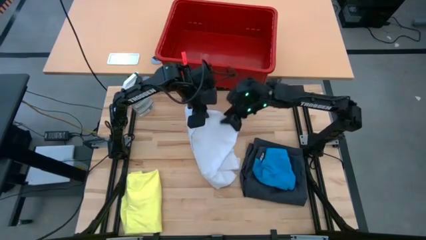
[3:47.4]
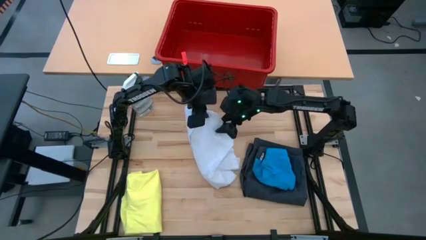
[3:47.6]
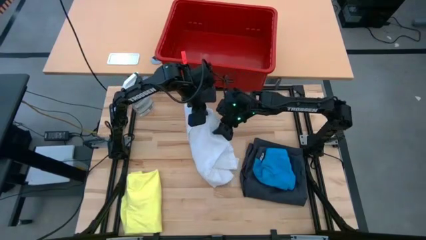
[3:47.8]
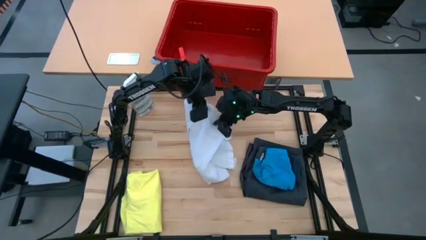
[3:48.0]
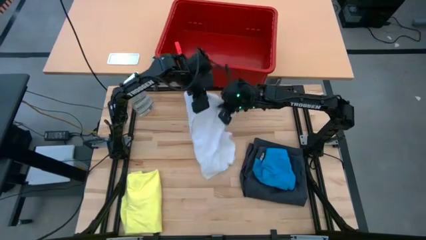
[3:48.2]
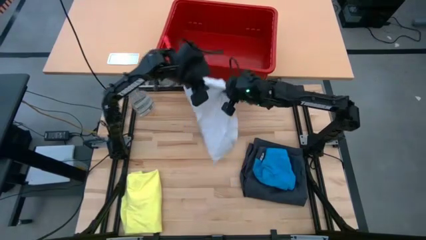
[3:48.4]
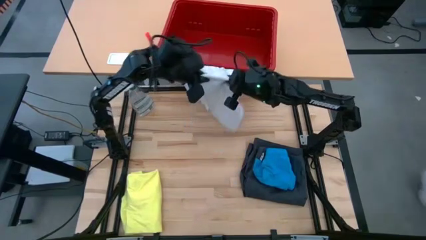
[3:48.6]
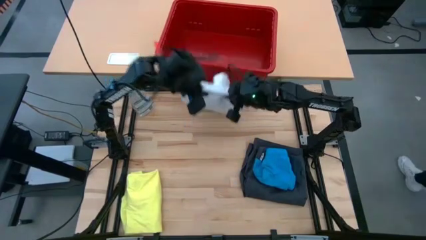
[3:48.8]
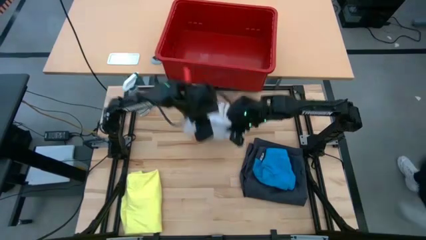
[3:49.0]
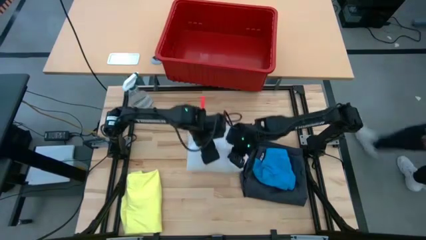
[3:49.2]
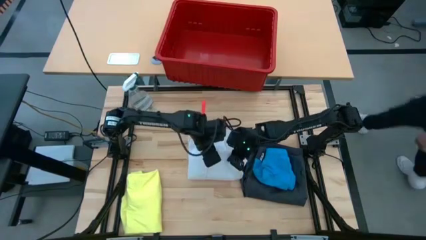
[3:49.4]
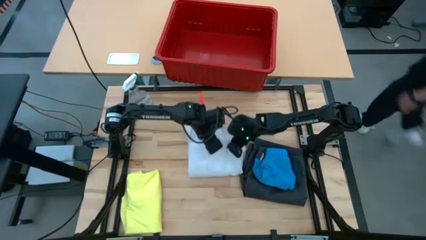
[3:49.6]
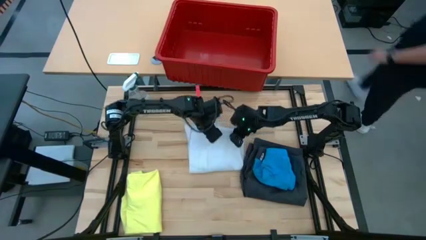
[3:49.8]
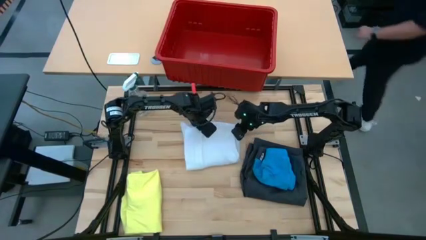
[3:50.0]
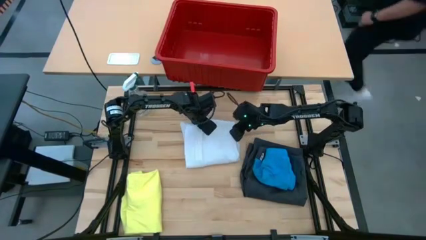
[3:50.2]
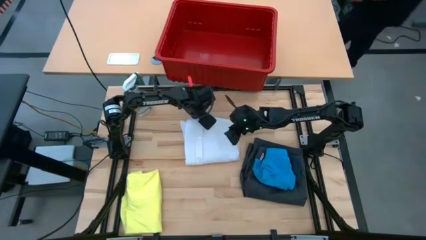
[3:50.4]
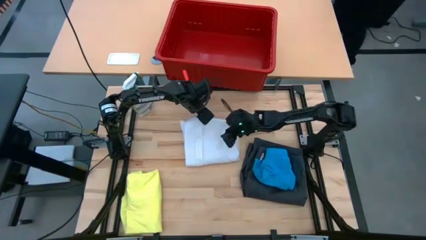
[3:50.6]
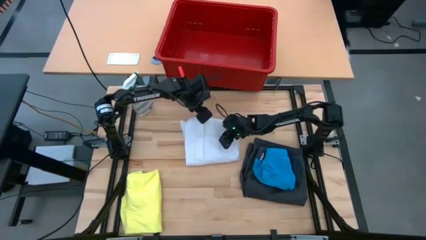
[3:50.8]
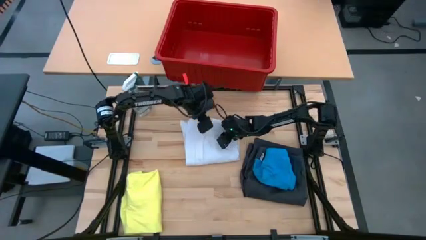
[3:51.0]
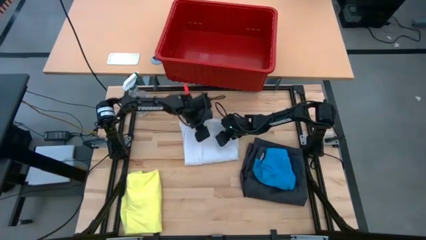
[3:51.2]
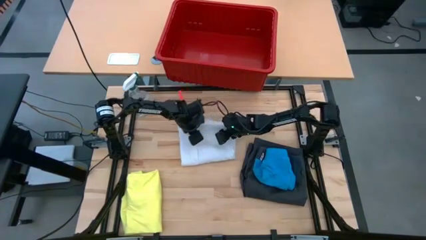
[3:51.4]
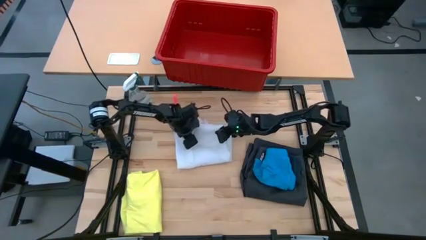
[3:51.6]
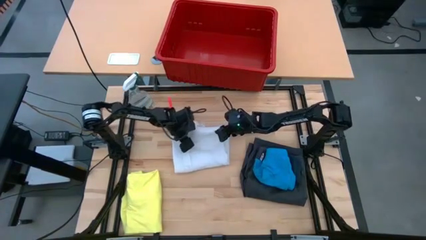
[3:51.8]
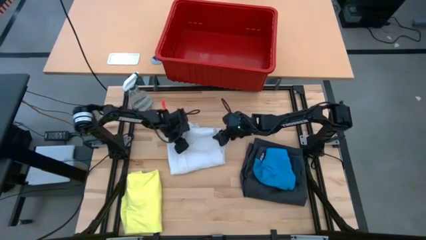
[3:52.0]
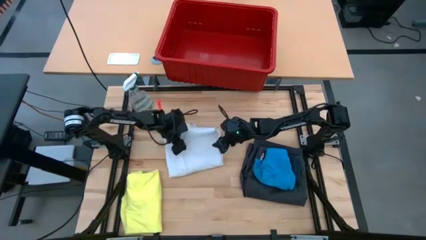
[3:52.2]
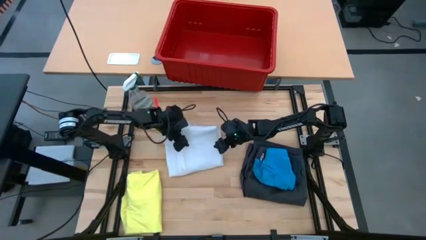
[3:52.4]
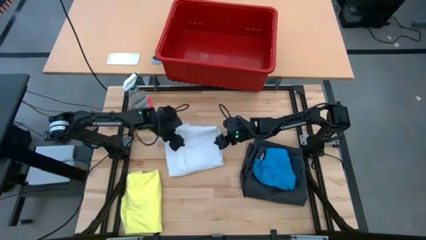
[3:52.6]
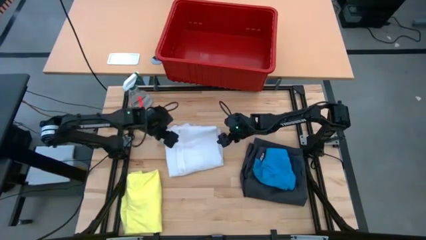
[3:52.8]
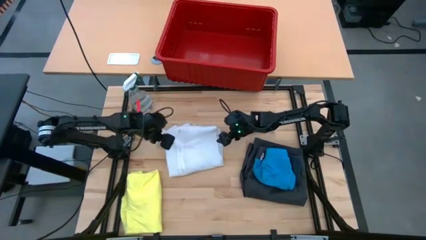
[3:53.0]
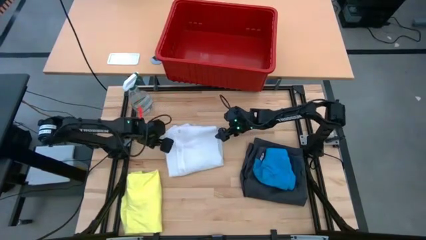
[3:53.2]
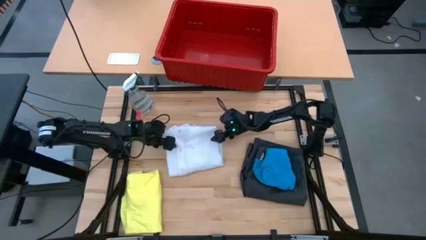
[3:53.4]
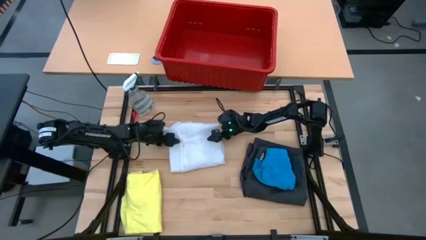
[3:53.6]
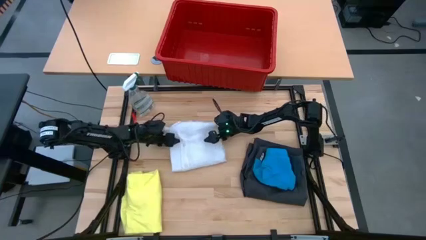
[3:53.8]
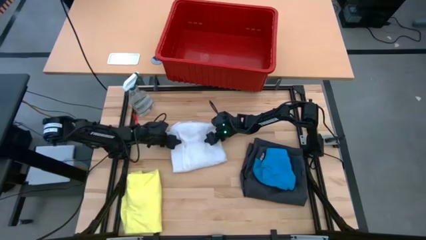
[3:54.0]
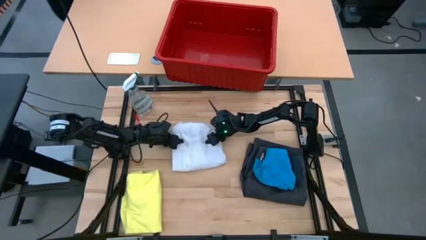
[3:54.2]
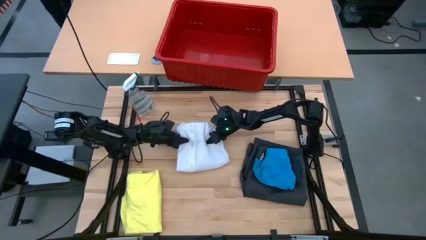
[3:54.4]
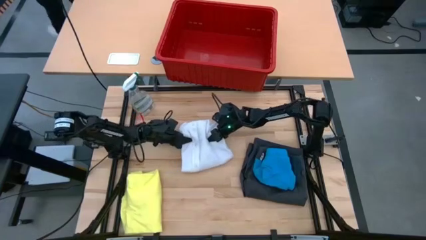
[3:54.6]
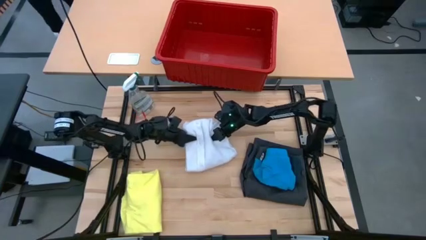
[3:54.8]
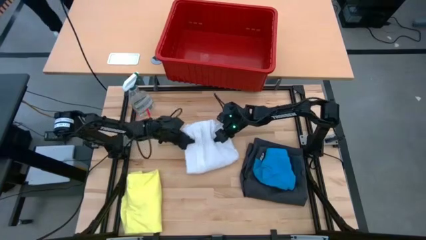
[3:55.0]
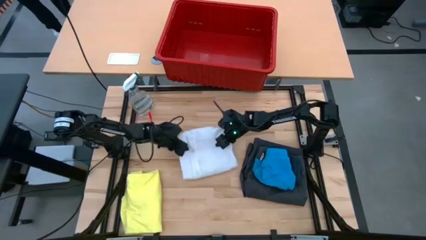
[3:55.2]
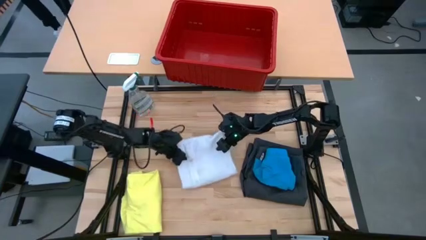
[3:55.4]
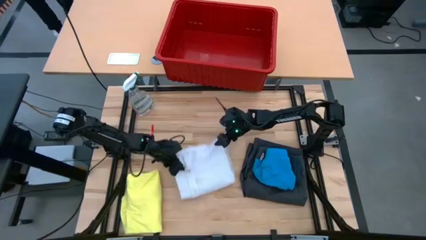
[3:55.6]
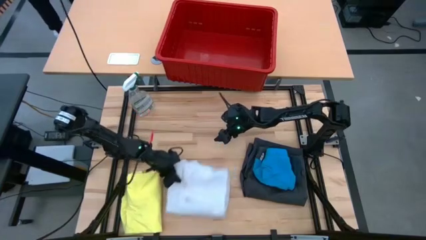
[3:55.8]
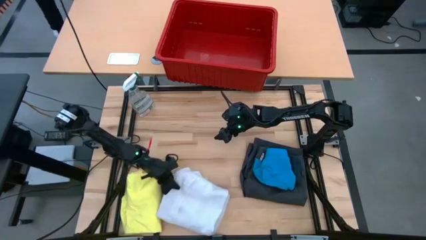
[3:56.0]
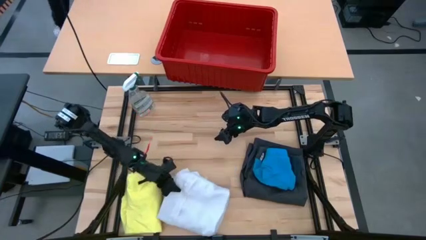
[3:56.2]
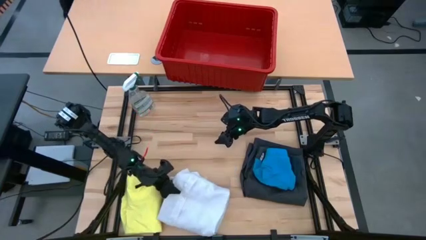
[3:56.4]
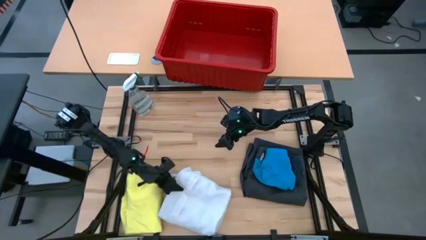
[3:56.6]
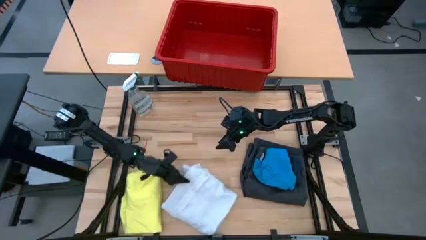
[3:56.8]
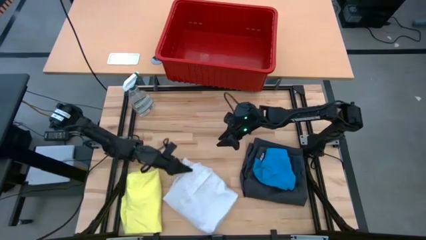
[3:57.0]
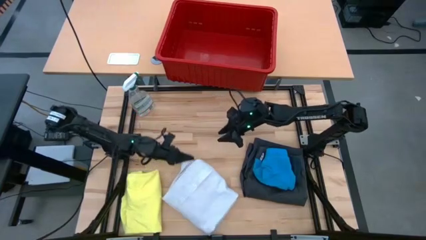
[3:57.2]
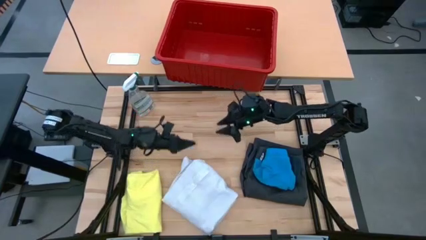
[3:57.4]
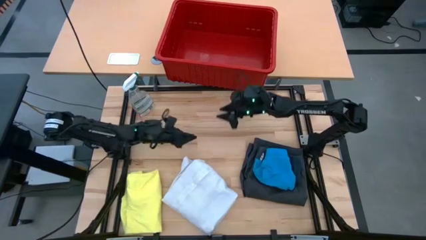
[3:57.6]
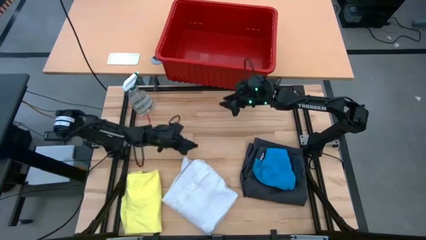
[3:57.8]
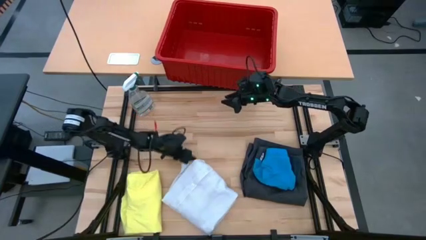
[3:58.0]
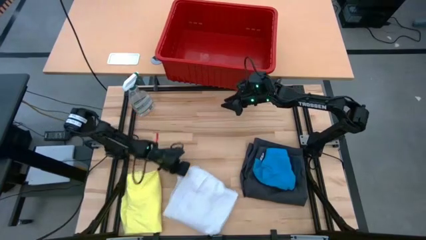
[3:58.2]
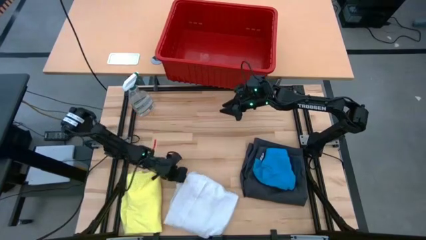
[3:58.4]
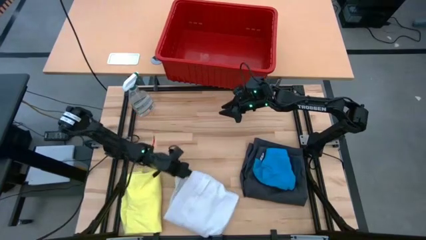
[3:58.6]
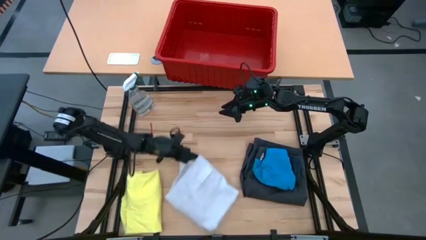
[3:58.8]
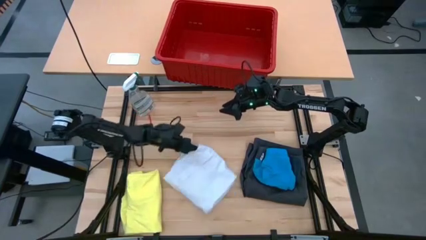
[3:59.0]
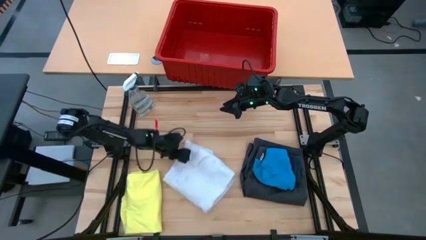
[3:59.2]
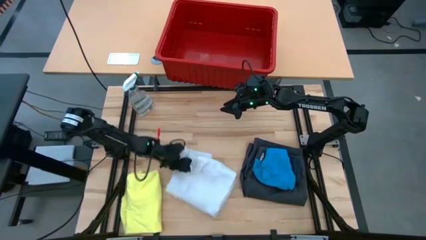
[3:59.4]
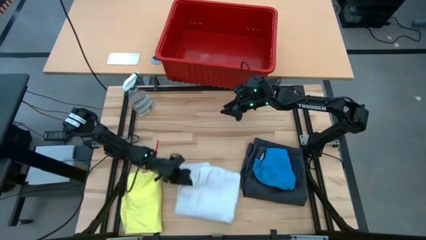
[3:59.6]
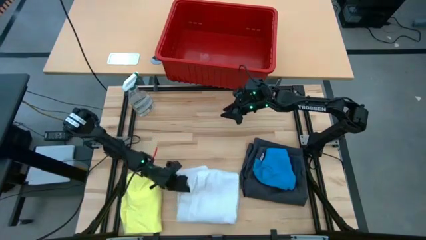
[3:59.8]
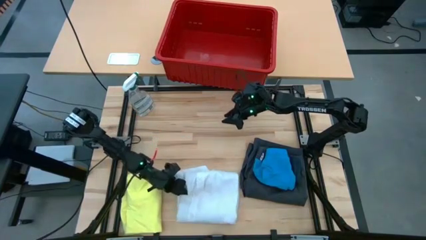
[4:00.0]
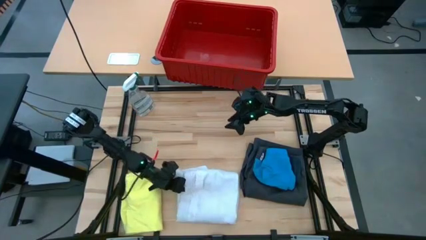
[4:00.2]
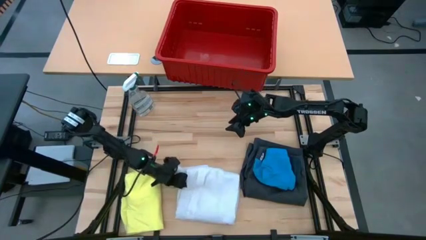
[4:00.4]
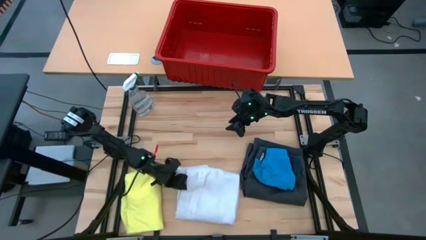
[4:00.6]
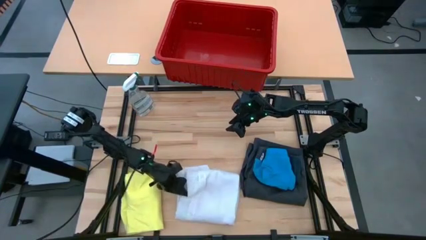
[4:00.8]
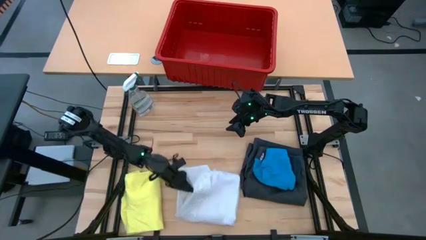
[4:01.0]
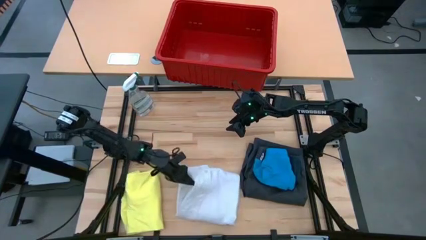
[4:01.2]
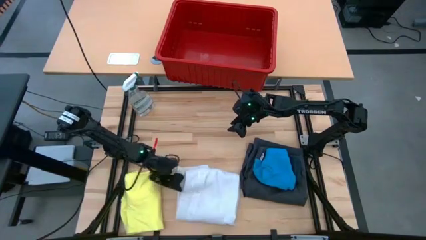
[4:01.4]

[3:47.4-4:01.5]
Task: Fold laundry
Fold the white polo

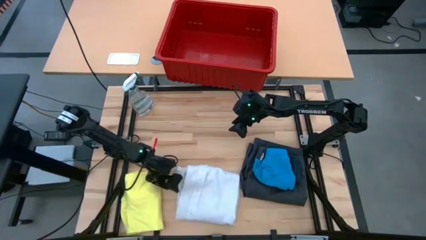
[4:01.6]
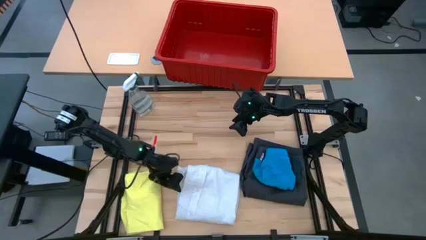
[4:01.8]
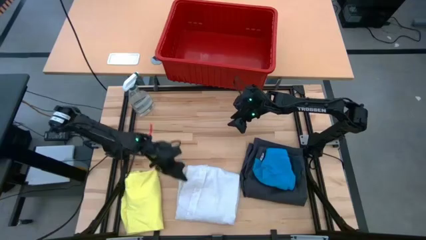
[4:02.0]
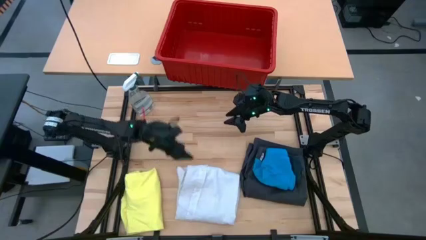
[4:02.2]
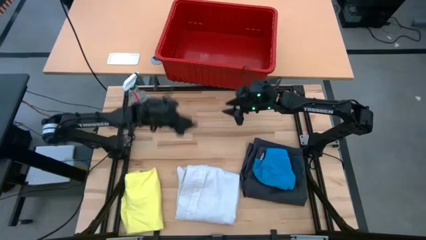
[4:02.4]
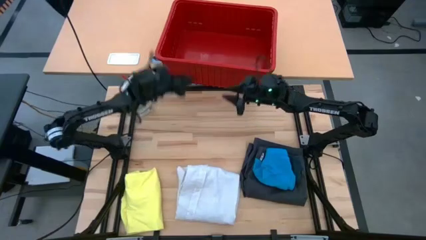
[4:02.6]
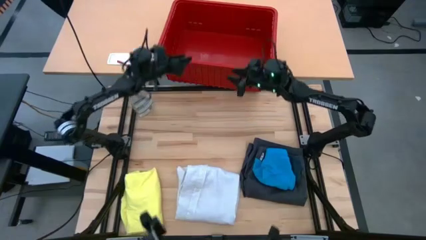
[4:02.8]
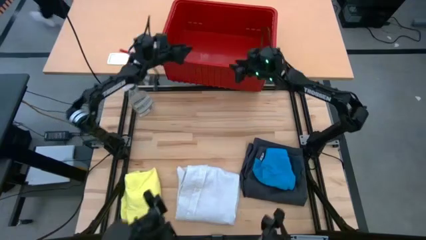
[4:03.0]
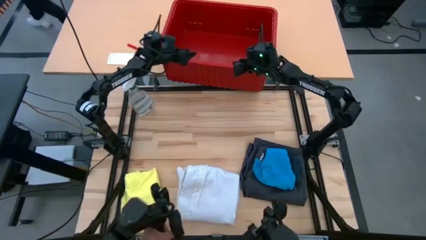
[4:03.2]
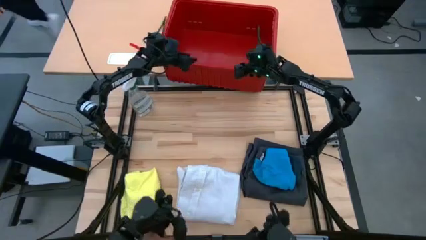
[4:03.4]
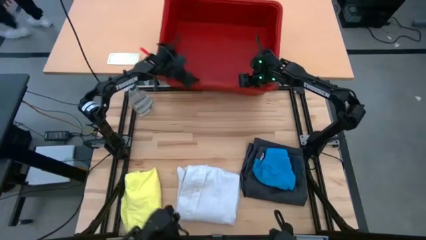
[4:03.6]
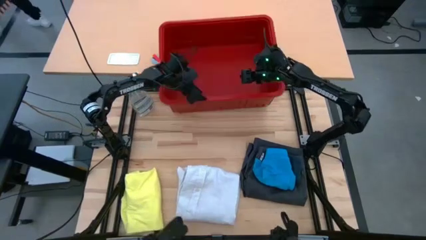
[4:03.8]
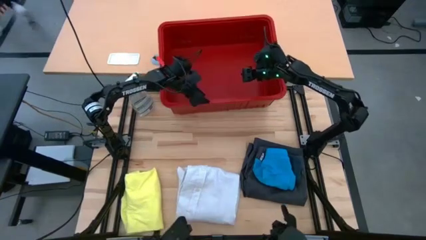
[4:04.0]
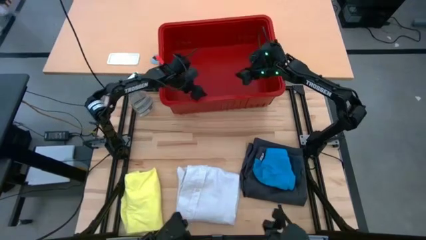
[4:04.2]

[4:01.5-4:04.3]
Adjust the red laundry bin
